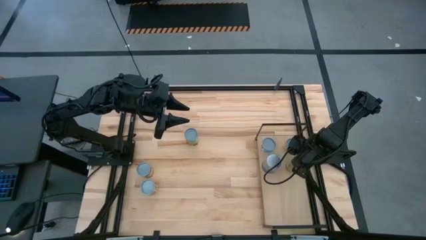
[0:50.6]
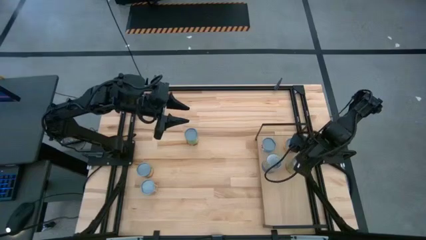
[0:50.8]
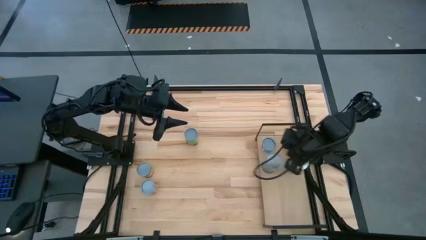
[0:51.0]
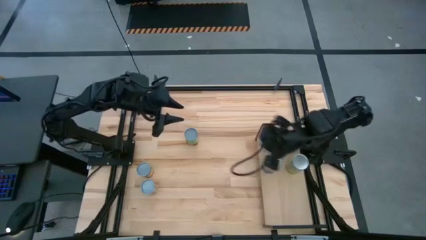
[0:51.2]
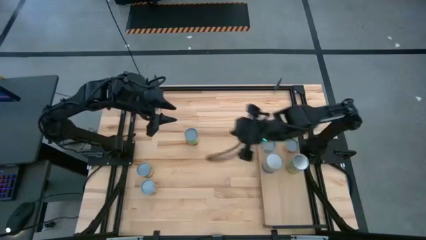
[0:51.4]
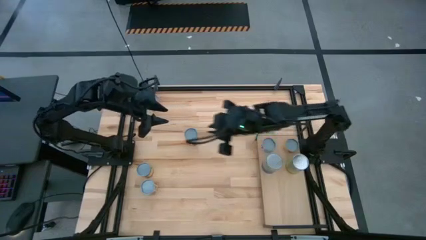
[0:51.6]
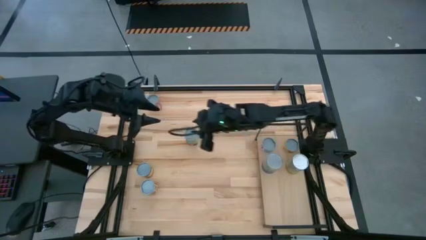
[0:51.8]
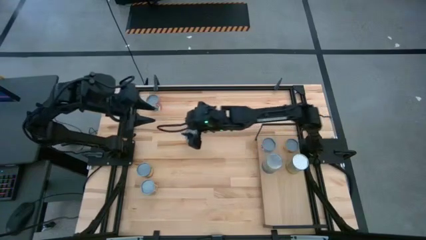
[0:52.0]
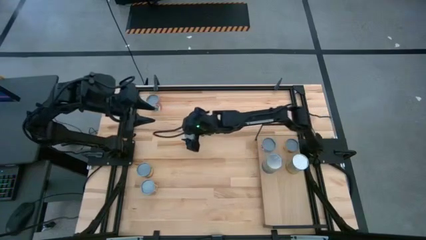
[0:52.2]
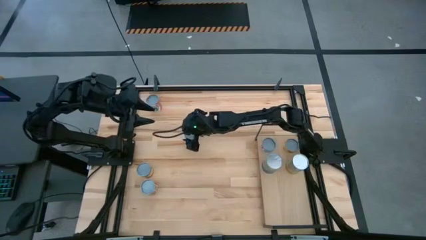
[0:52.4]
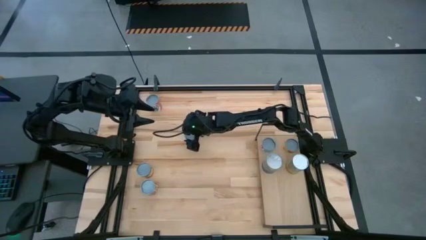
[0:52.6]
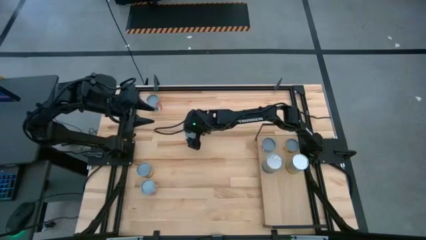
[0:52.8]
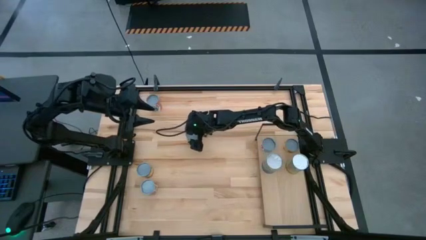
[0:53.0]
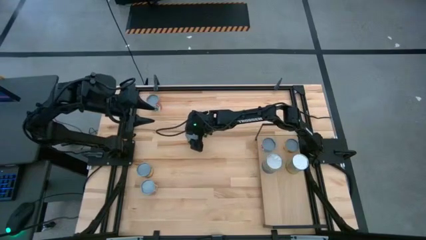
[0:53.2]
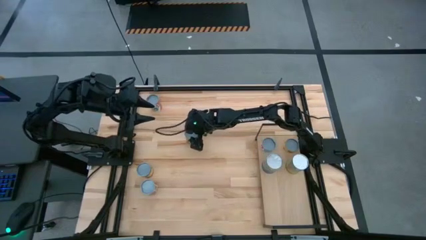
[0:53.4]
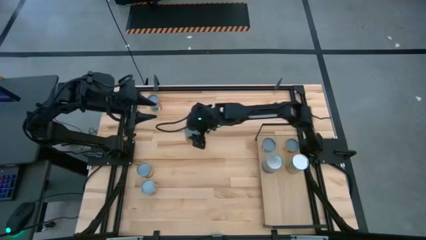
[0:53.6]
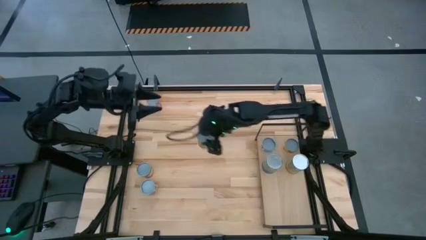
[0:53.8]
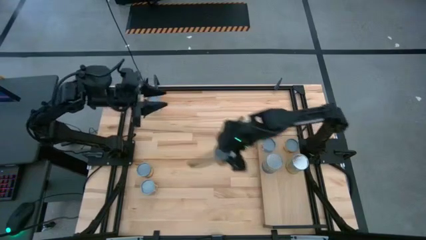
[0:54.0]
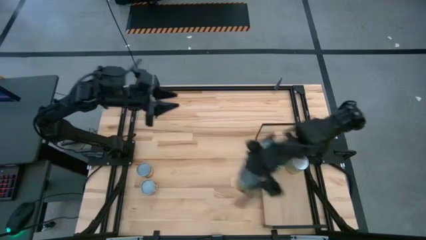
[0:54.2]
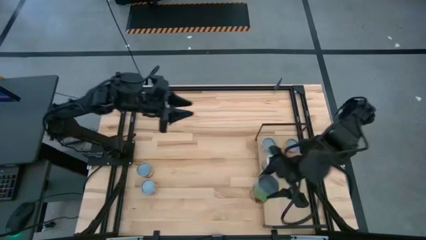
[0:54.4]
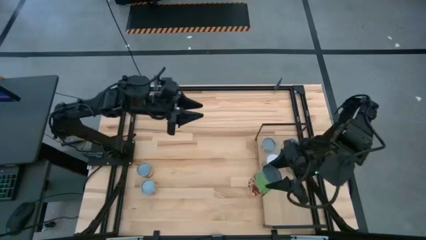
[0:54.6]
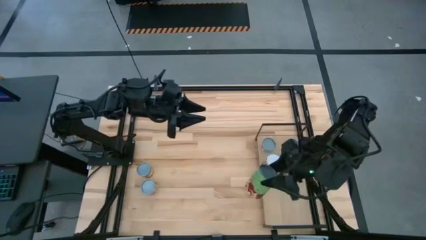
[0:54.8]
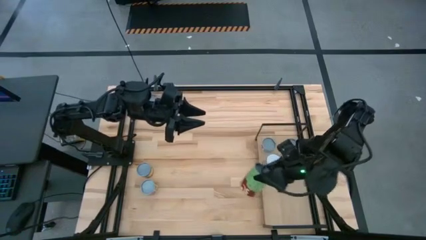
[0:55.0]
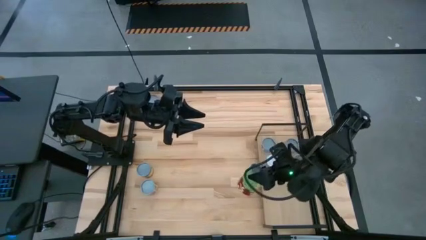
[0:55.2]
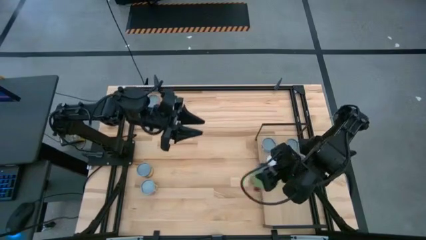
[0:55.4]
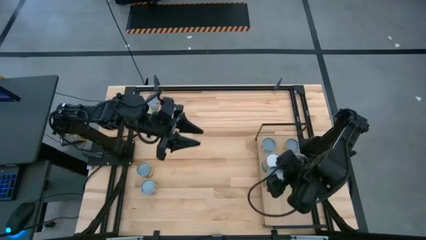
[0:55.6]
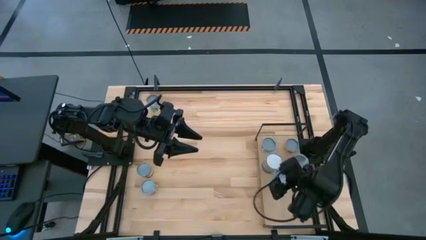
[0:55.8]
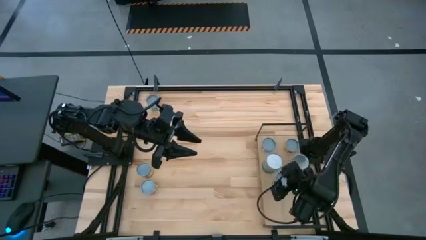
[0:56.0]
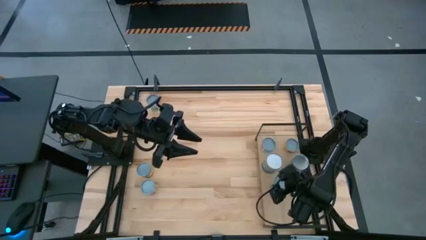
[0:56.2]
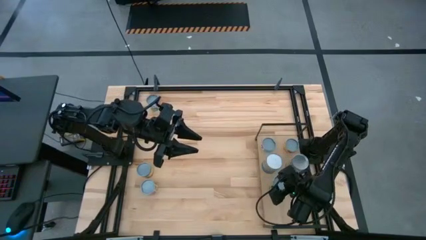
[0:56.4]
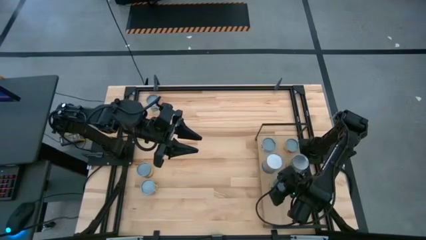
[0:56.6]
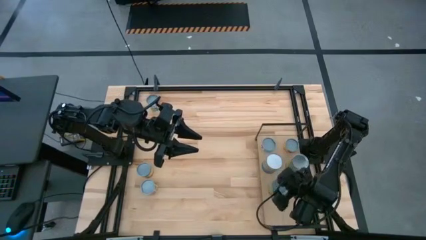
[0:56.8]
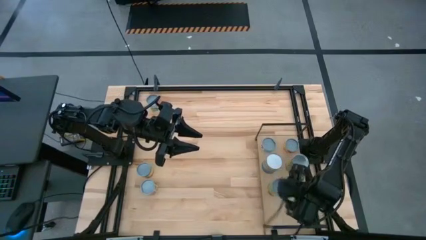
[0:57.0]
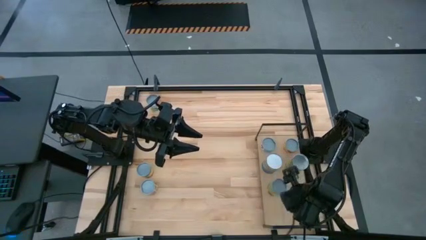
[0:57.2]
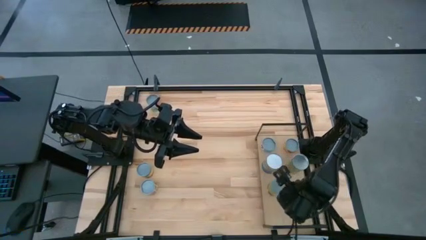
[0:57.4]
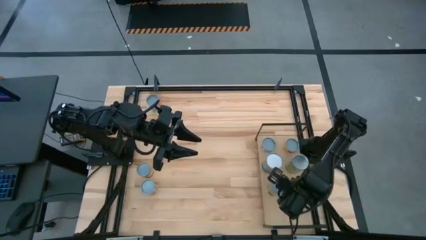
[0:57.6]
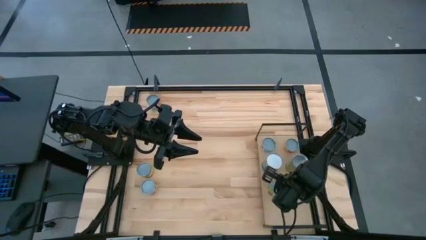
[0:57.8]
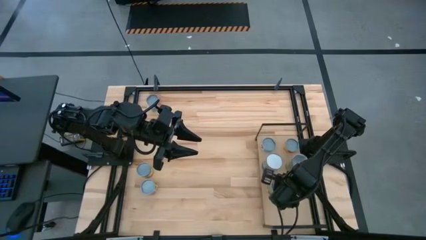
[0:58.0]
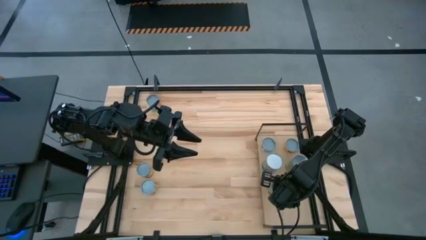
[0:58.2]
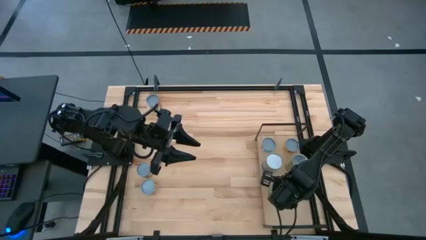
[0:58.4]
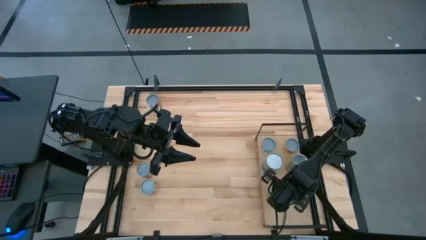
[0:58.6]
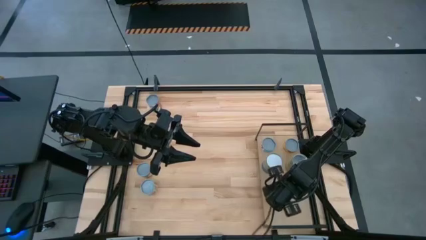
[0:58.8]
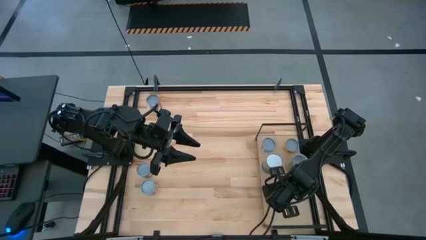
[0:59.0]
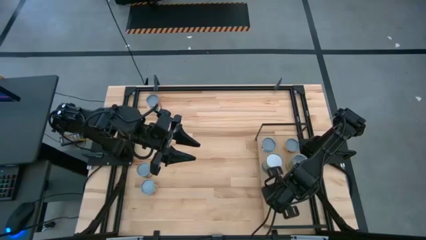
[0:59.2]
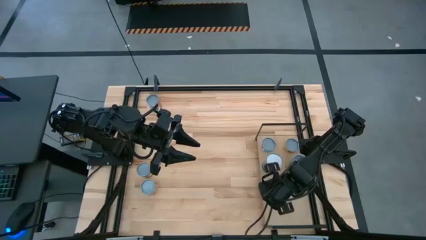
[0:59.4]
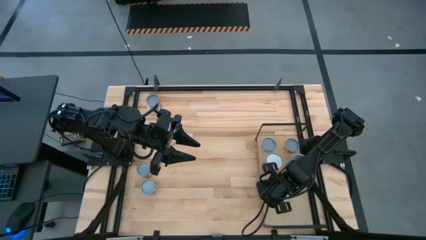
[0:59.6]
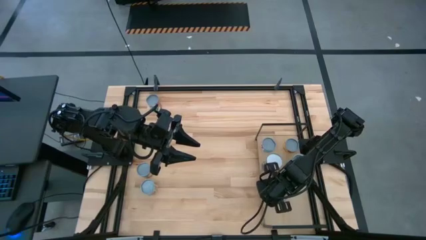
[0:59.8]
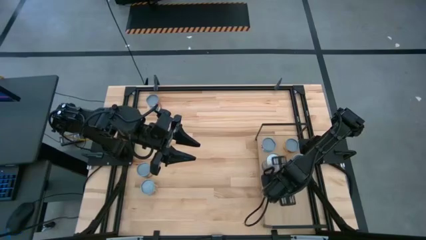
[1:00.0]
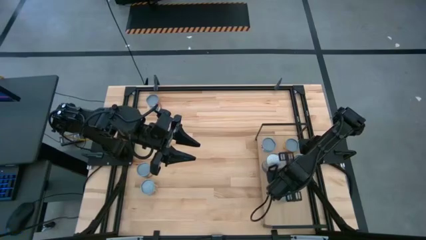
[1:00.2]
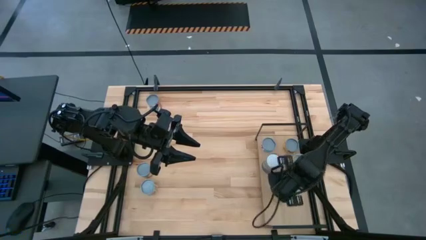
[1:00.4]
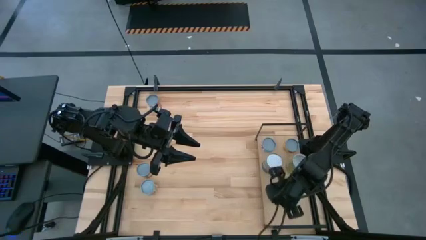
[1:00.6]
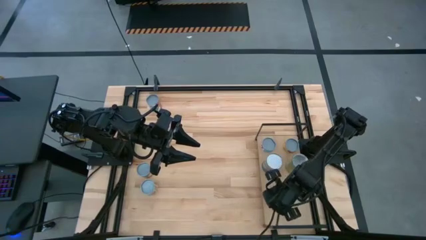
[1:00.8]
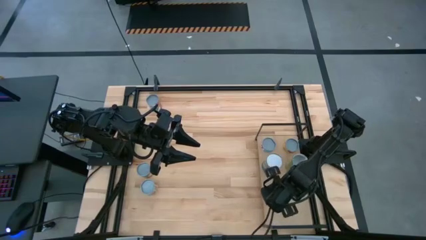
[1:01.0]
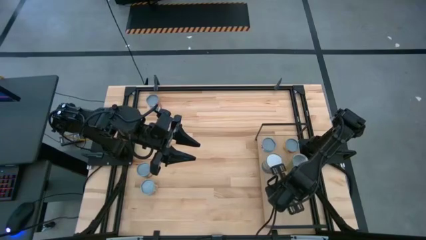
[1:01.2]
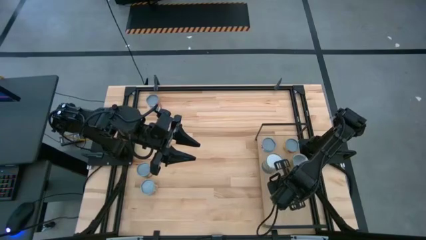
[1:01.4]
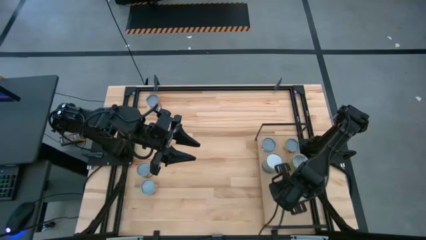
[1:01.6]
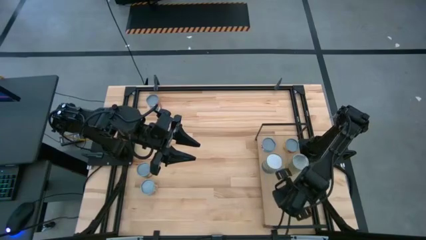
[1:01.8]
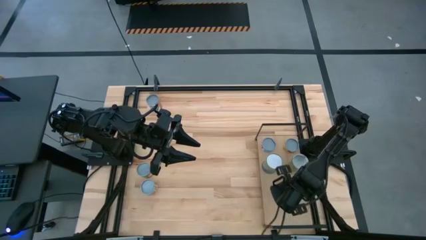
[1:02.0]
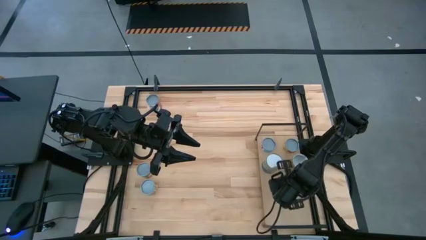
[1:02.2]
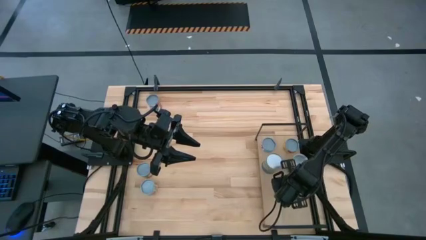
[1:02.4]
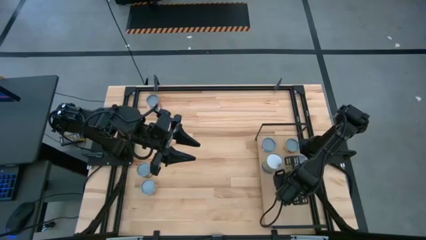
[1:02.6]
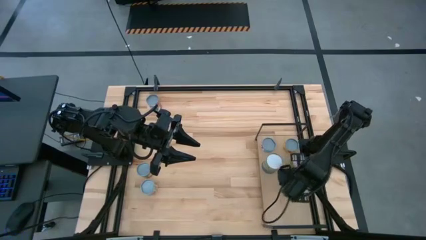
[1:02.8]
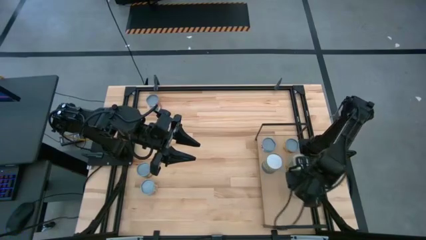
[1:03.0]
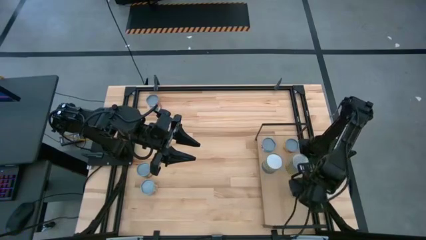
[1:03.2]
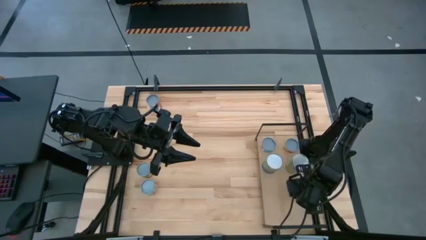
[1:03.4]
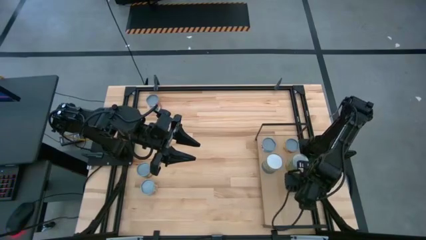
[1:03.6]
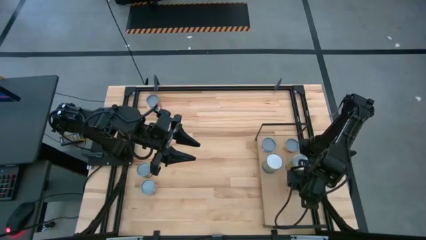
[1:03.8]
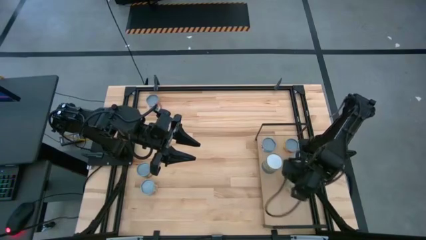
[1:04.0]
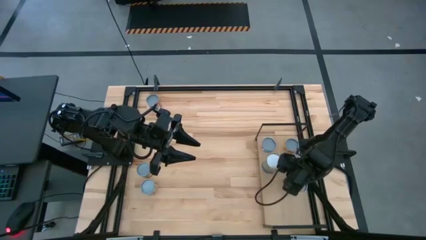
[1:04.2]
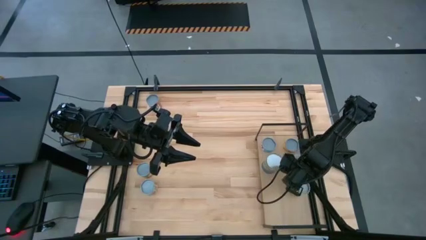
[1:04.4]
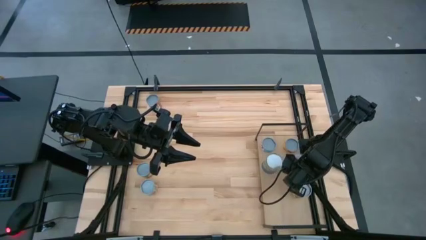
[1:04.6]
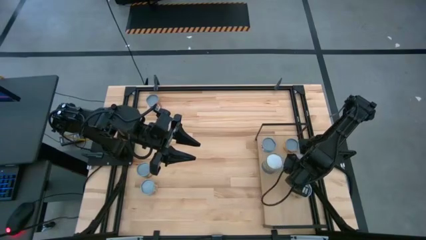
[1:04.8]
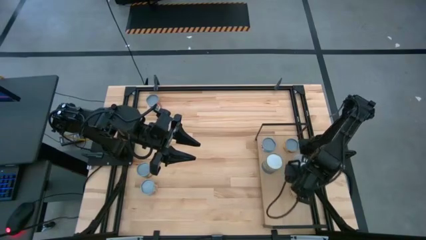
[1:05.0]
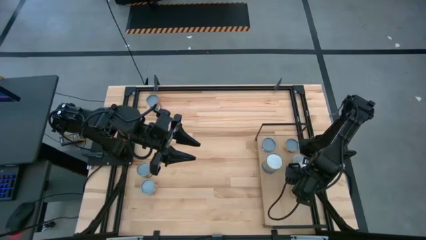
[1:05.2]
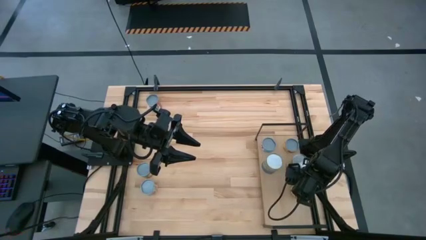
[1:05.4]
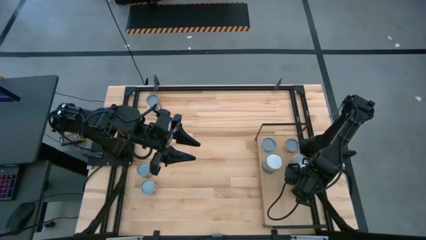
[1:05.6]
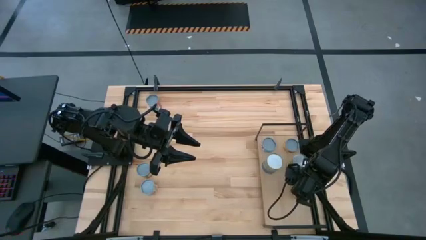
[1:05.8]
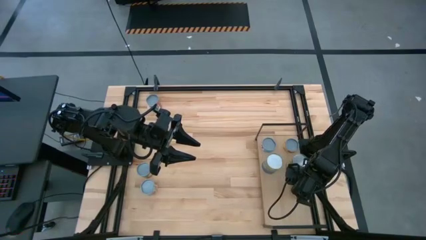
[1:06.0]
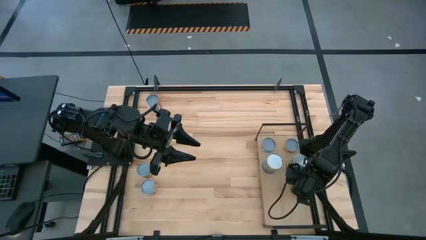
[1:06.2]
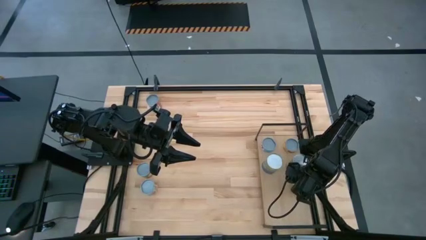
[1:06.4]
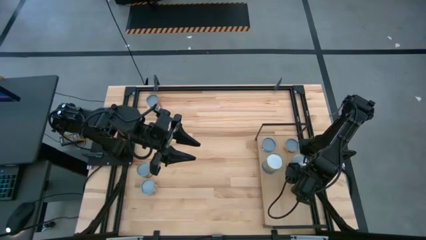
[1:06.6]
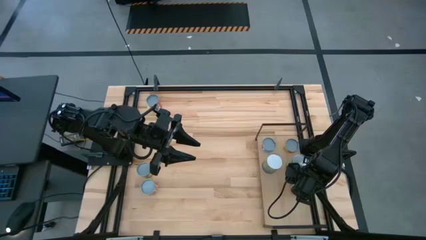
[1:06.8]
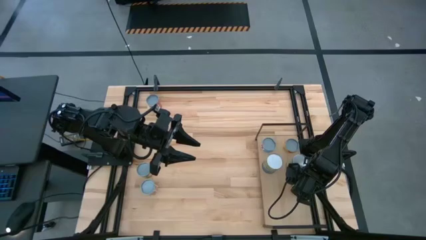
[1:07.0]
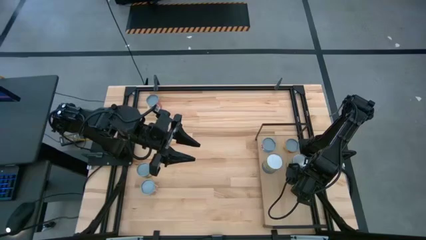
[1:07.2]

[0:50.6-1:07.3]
Task: Pick and place cans onto a shelf
Put the canned spaghetti sauce on the shelf
